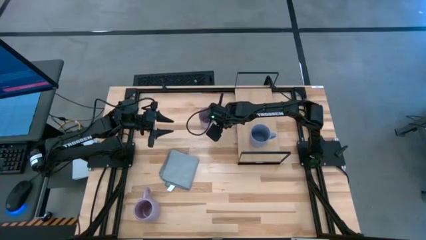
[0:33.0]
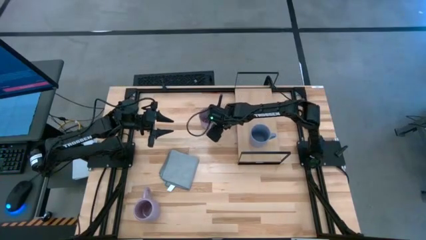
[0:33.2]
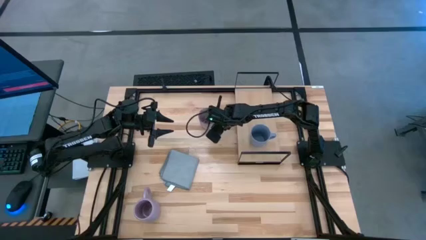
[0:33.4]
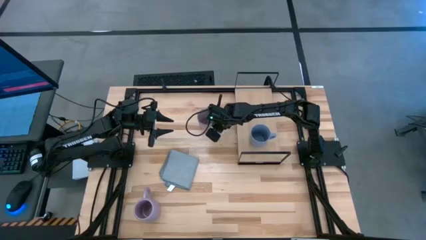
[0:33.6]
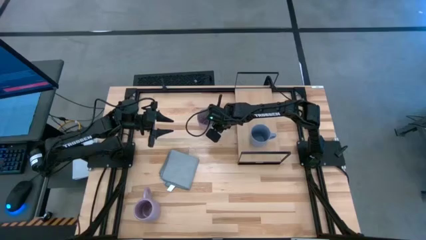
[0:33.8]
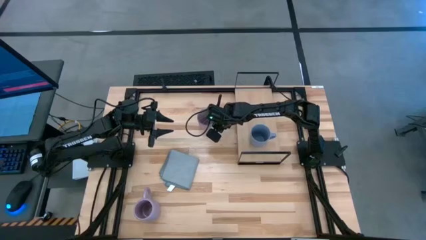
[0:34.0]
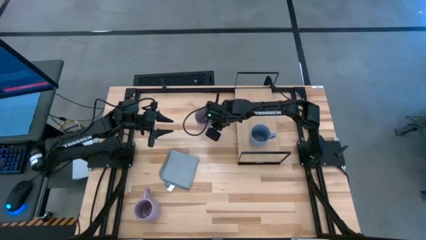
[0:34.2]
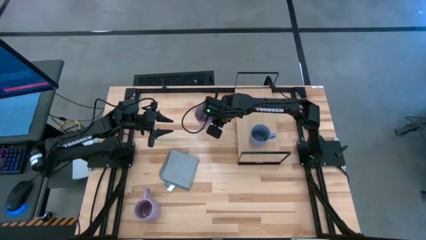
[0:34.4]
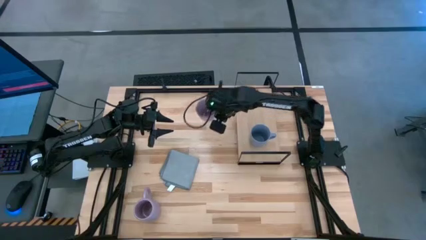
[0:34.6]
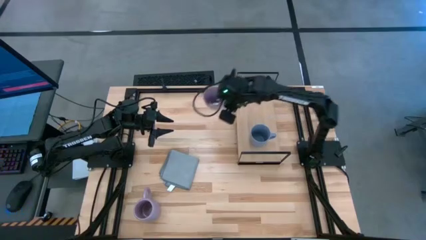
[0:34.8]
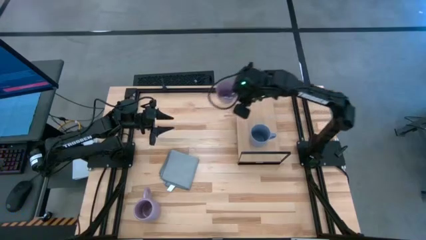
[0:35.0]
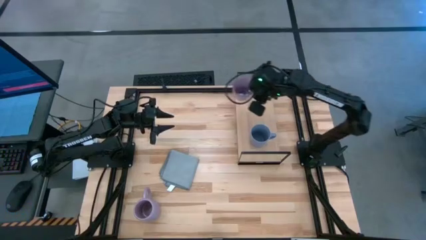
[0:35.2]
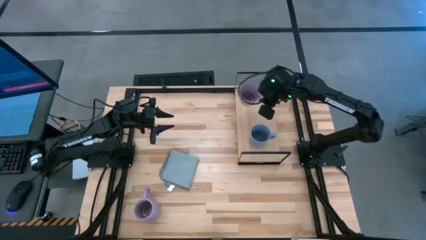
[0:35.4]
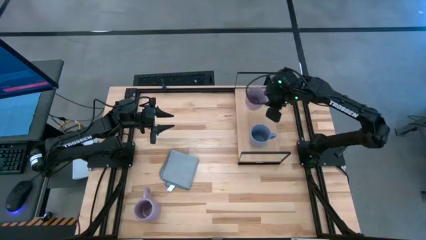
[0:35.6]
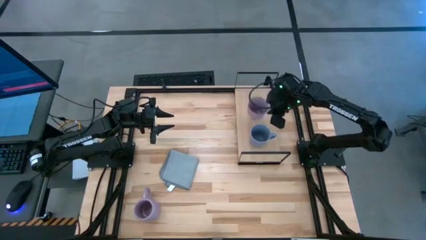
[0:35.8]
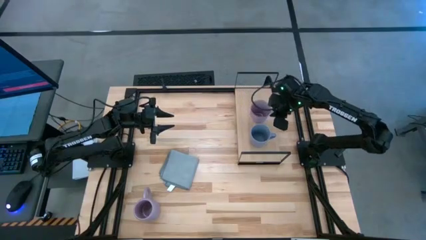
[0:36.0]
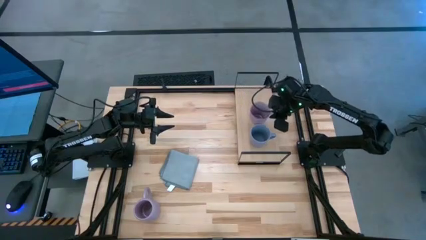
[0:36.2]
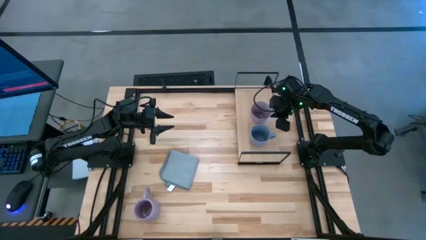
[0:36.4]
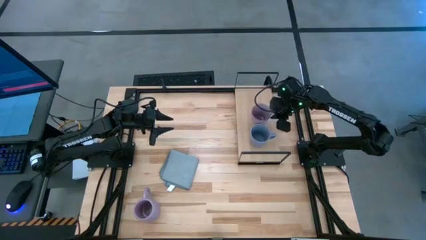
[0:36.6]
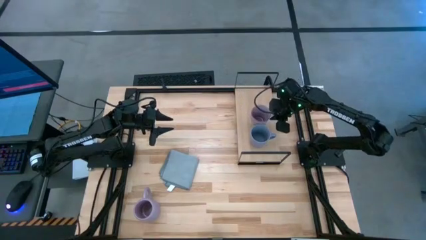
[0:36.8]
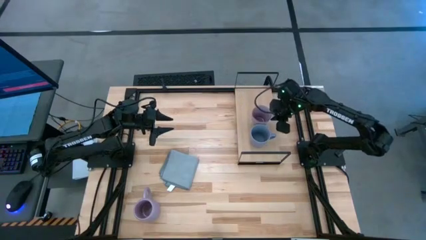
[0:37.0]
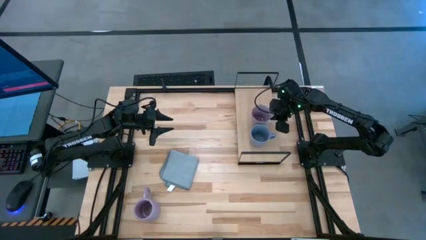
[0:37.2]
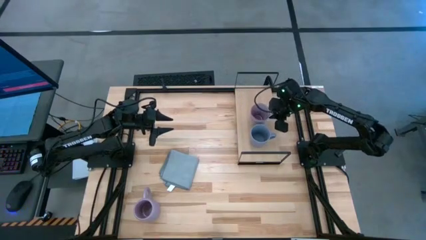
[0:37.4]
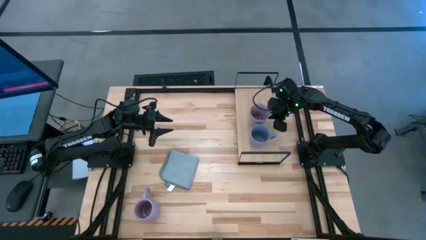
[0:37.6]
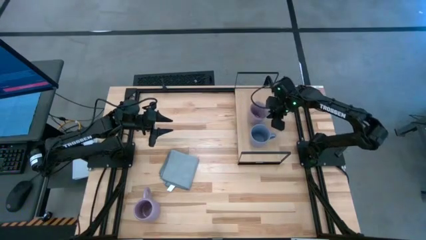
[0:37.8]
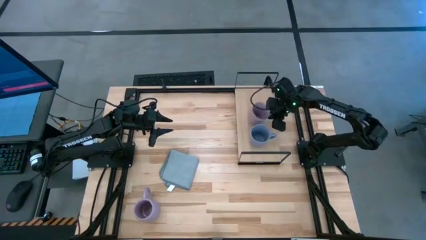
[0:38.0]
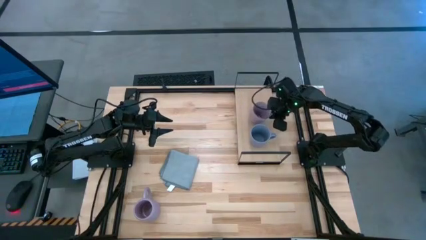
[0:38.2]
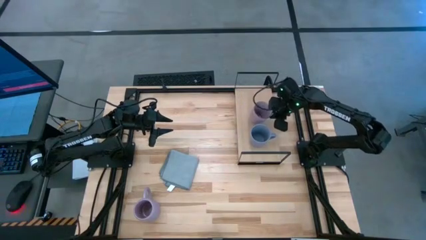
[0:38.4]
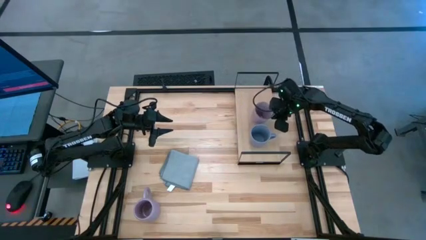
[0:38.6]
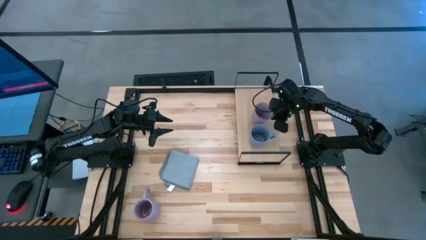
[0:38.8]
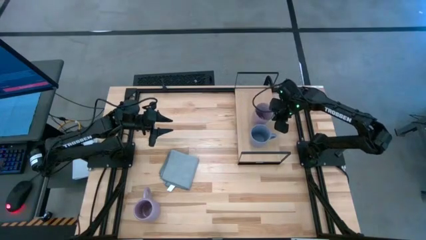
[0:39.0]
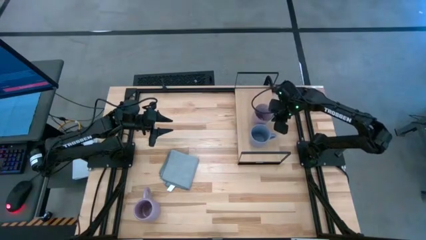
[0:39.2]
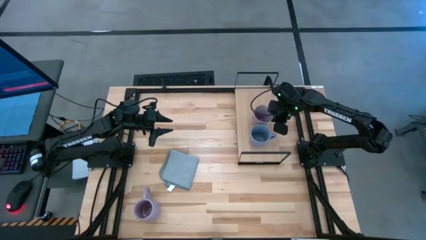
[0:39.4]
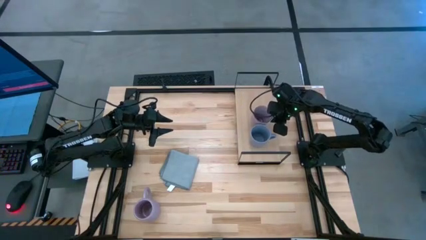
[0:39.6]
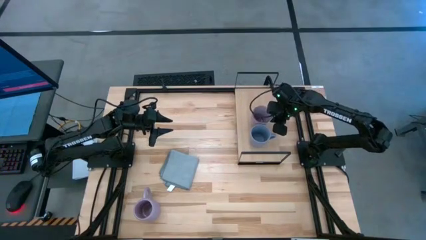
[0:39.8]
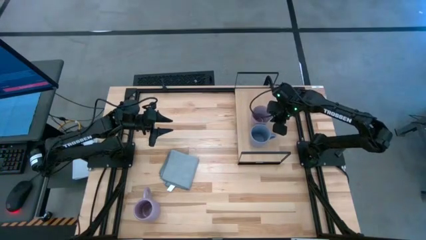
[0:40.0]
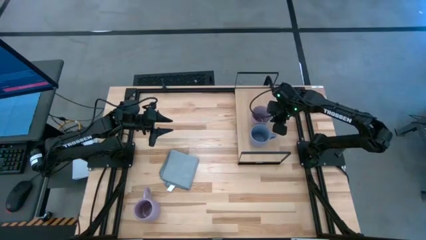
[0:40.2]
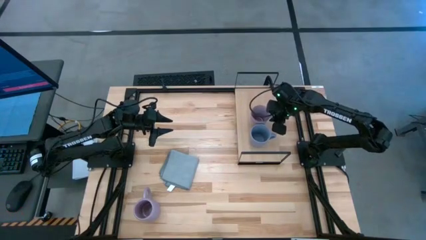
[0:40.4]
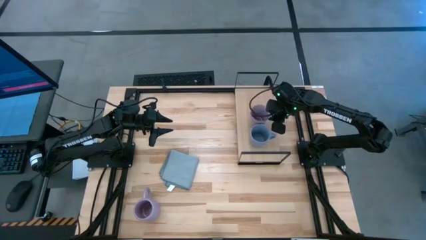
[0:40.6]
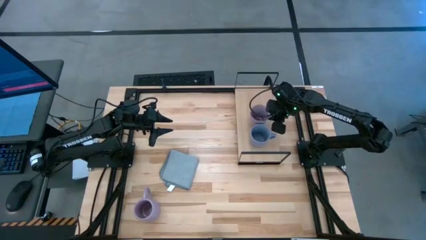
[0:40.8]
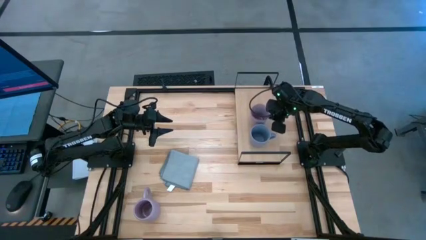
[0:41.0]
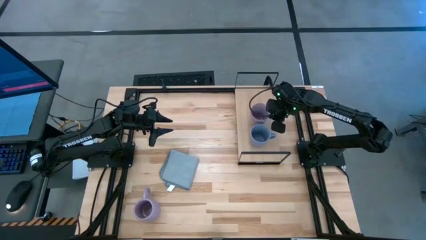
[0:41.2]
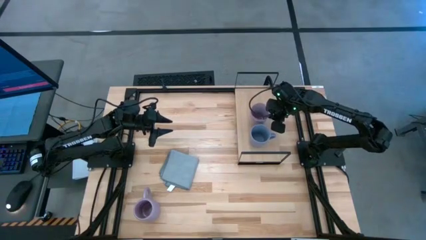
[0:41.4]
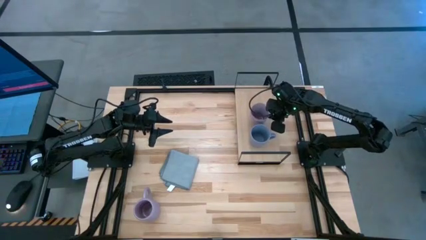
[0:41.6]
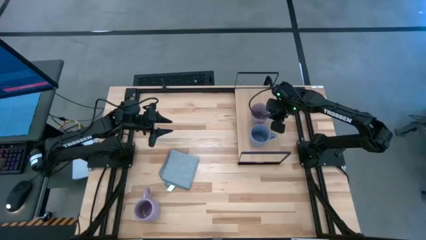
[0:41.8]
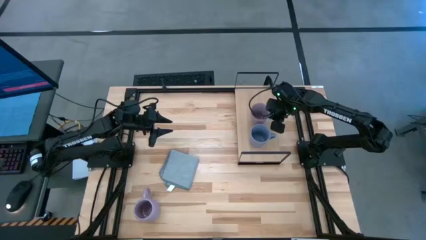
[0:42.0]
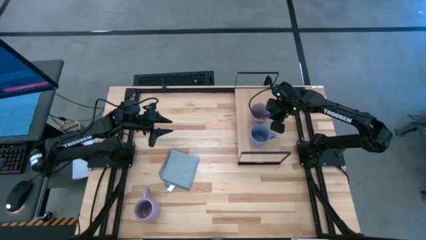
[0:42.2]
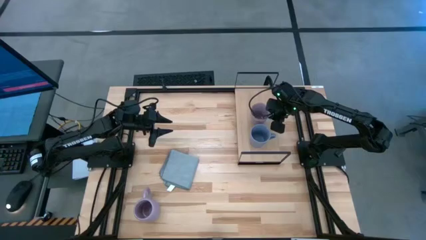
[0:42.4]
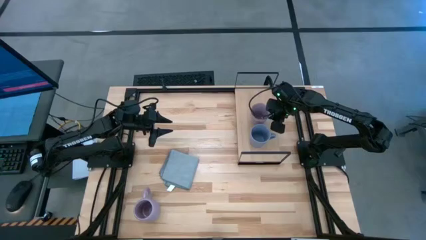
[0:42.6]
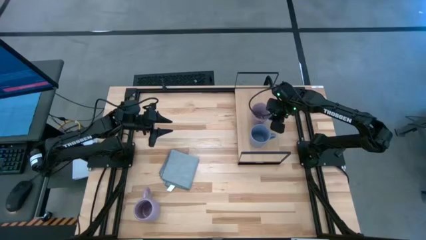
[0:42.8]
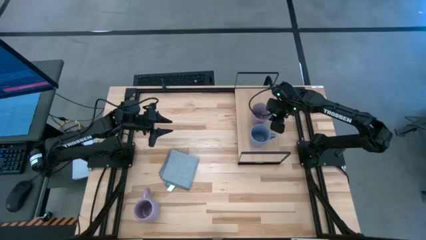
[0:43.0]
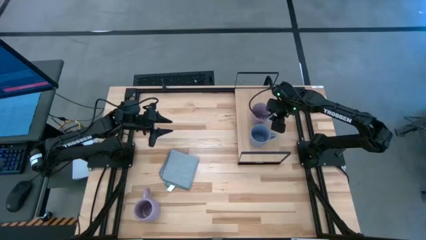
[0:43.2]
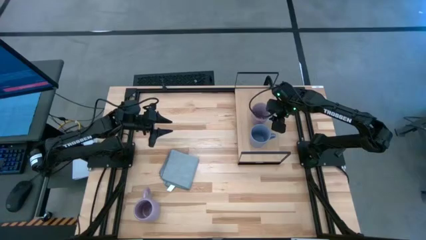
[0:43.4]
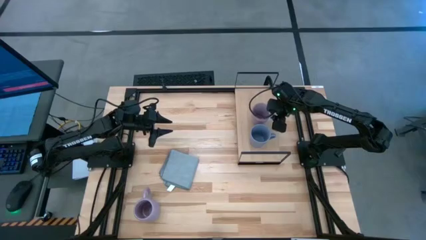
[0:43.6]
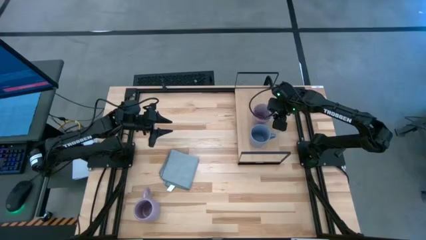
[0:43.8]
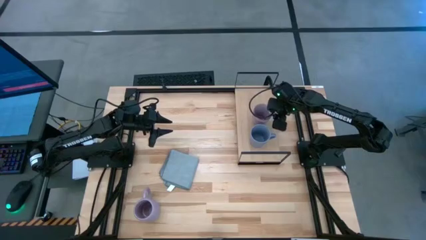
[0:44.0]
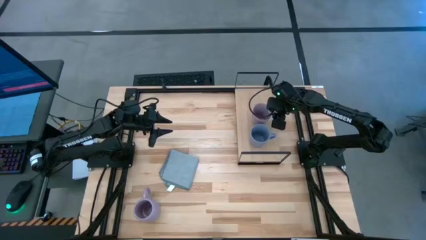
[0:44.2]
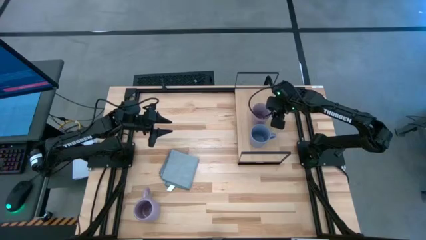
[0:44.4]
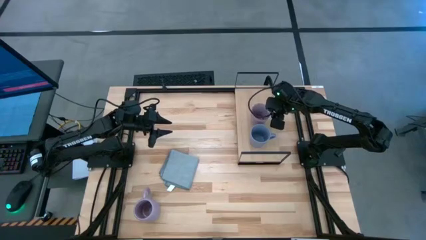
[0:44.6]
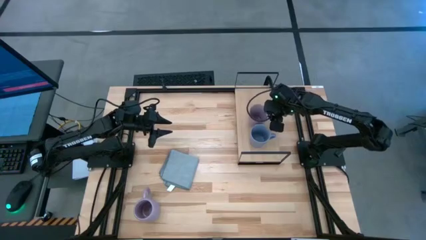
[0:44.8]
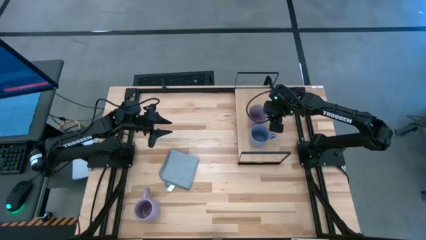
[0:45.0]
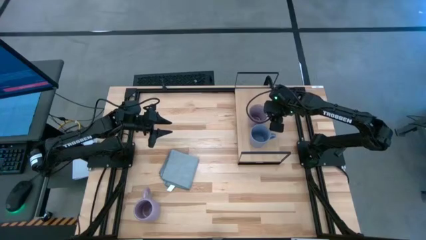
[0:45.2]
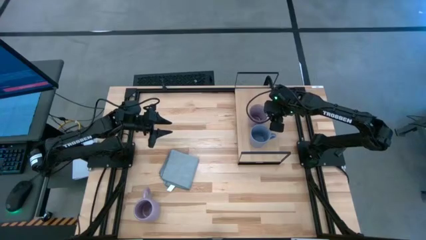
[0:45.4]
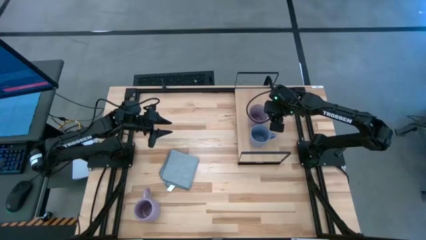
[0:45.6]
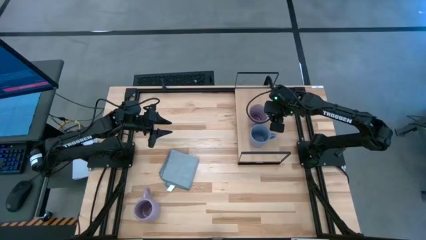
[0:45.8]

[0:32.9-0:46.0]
Task: Stack small to large cups/mugs on shelf
Put the white and purple mug on the shelf
